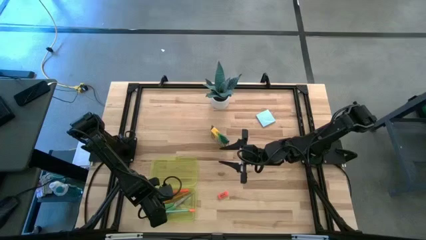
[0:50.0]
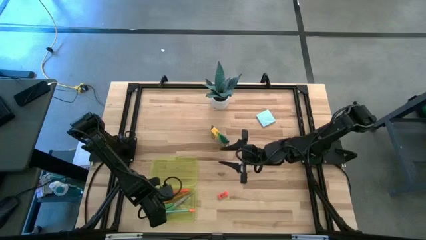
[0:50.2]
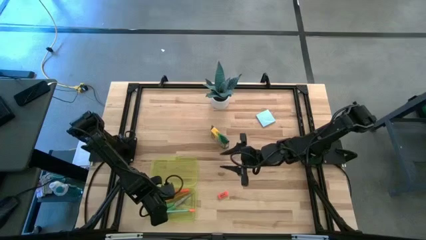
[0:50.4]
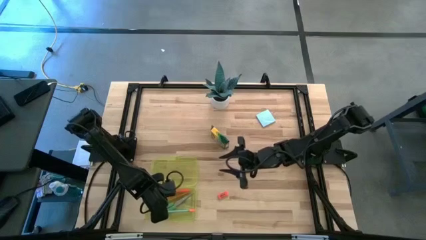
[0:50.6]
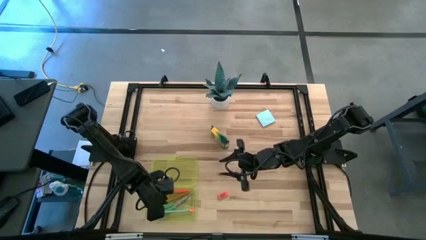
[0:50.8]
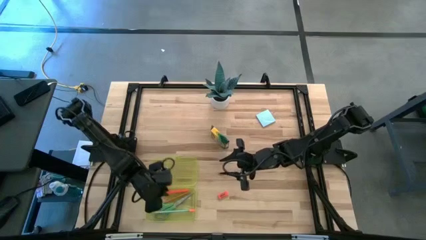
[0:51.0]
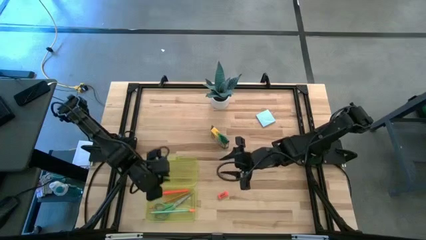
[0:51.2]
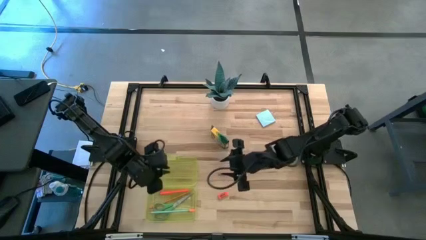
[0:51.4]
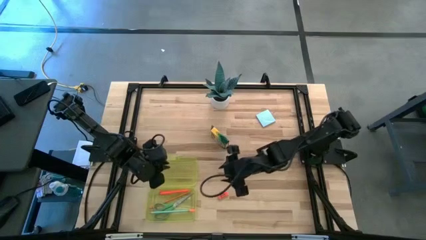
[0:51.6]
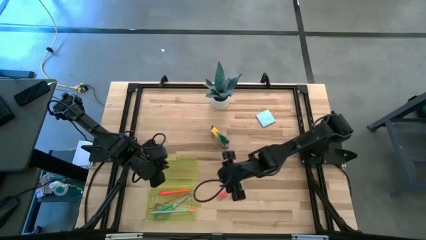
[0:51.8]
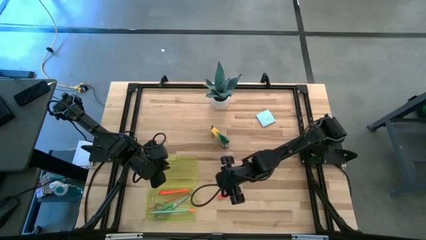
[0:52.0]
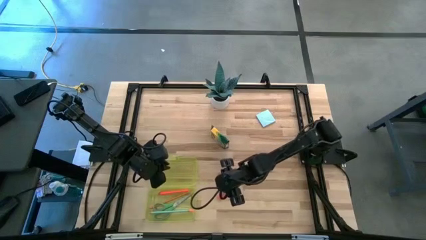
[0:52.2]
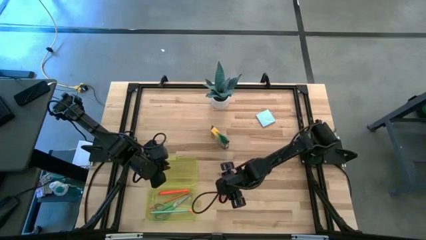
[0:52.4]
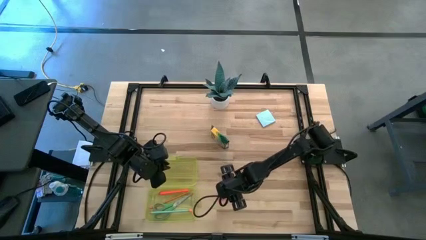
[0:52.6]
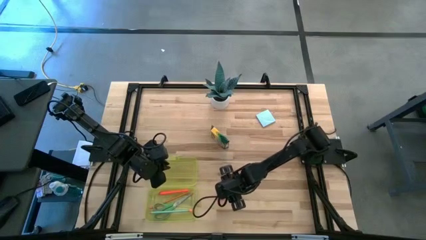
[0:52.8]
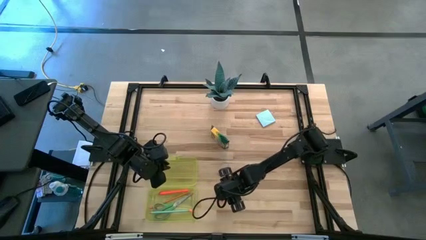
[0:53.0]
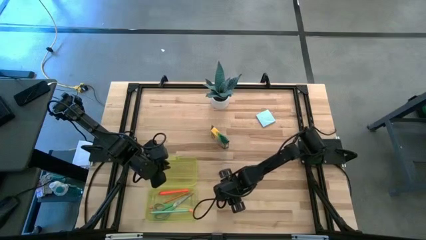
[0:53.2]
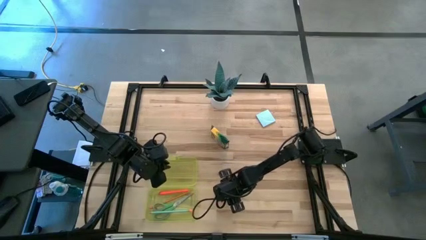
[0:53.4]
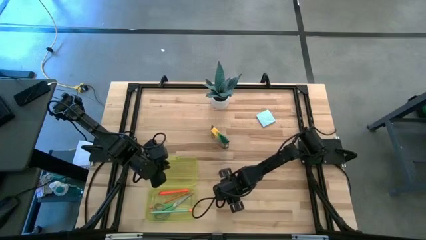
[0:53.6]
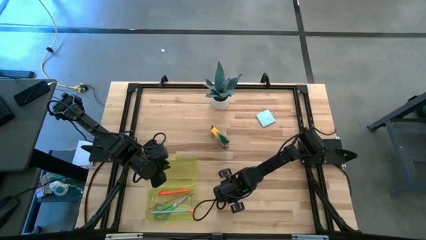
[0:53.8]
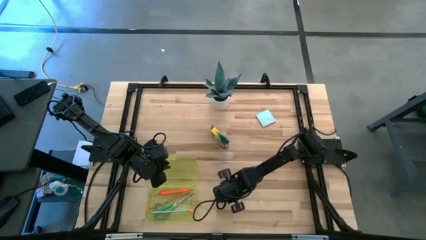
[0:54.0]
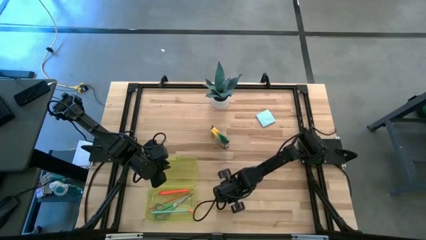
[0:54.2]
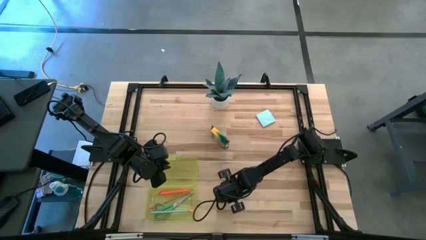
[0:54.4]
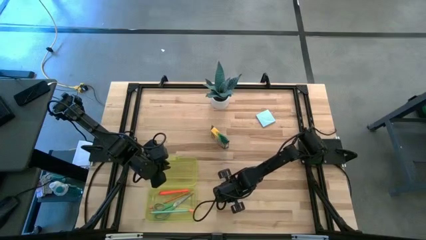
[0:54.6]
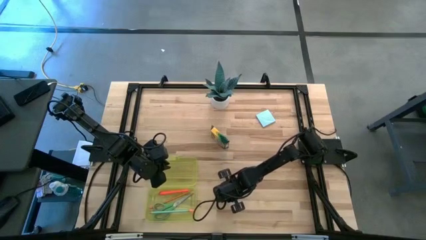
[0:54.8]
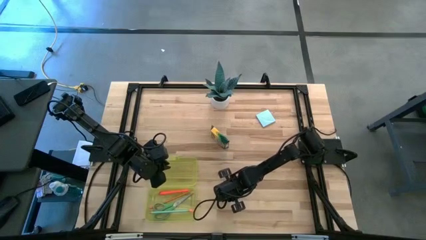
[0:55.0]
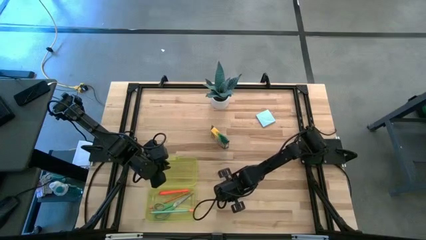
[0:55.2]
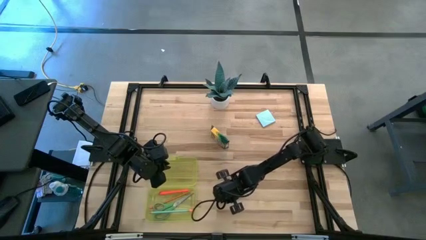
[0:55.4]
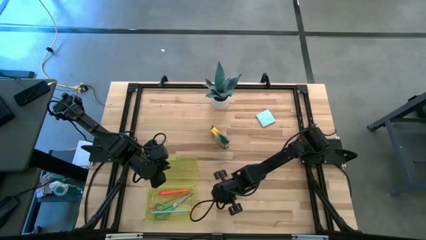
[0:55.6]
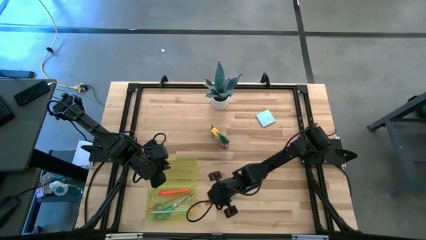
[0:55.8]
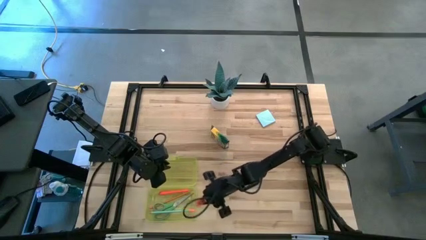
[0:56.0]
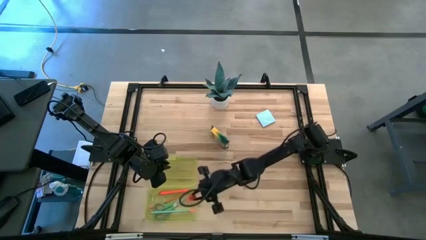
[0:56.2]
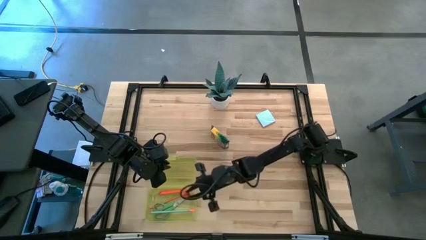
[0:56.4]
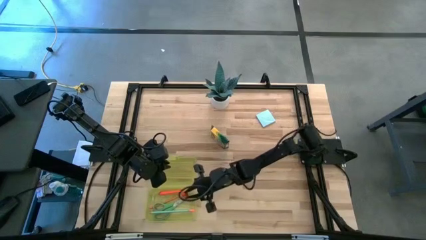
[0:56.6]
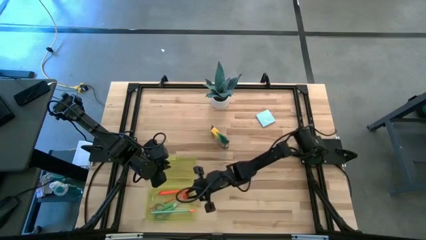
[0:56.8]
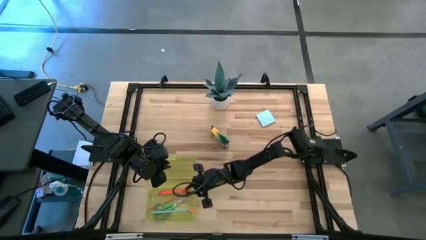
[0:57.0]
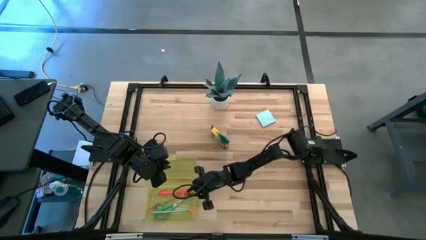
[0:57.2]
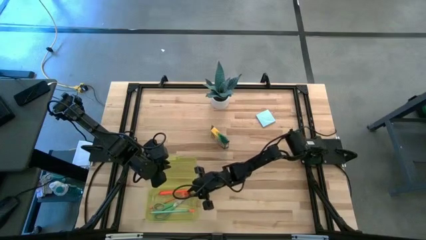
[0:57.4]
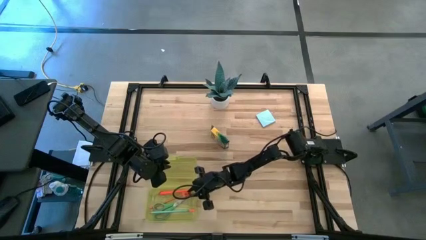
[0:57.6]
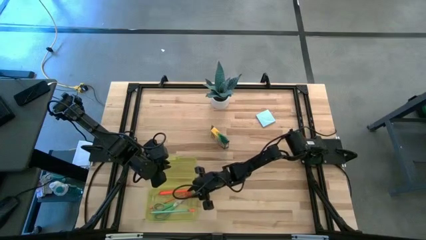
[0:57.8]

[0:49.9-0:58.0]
Task: Pack school essentials
Put the orange eraser into the yellow supply box

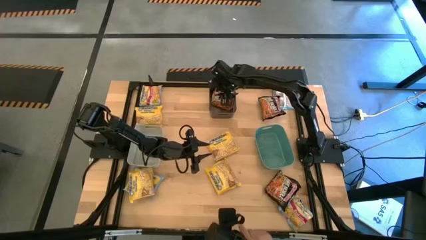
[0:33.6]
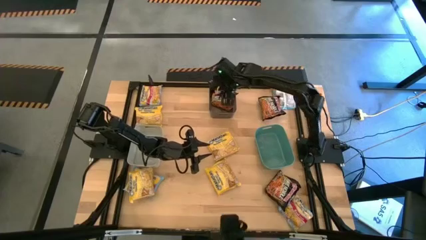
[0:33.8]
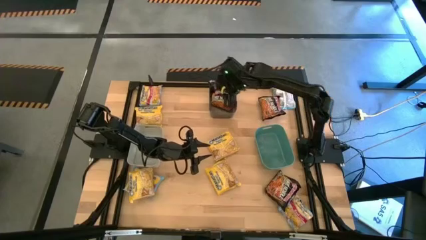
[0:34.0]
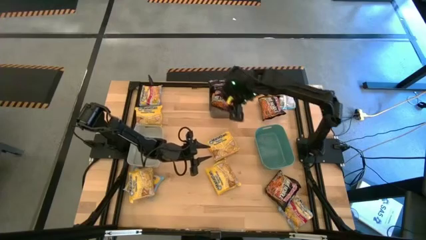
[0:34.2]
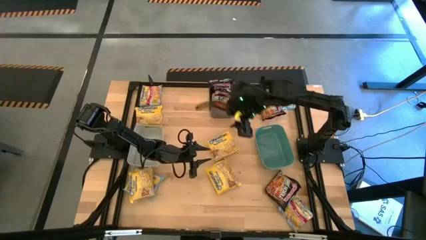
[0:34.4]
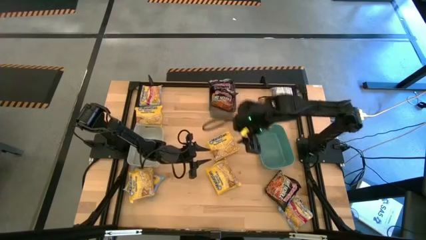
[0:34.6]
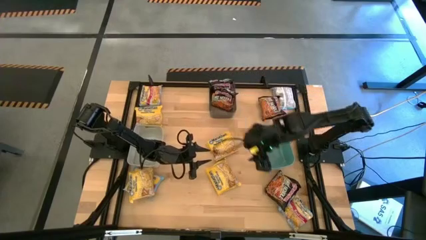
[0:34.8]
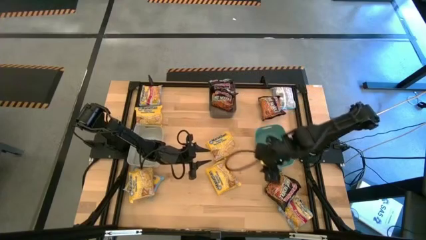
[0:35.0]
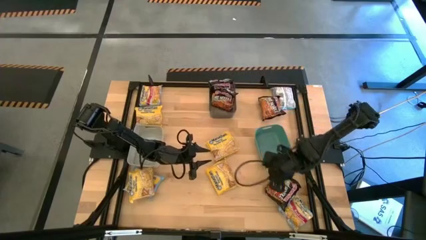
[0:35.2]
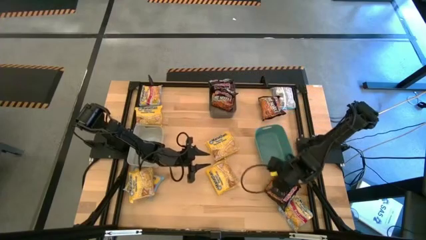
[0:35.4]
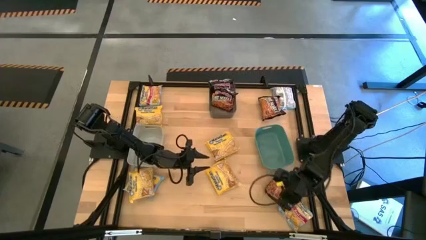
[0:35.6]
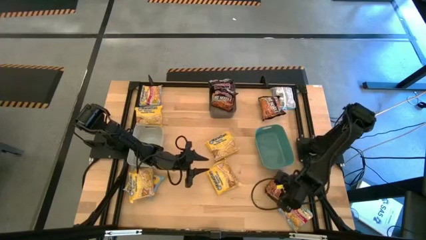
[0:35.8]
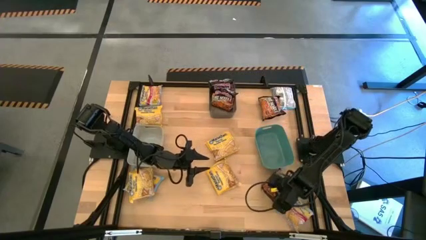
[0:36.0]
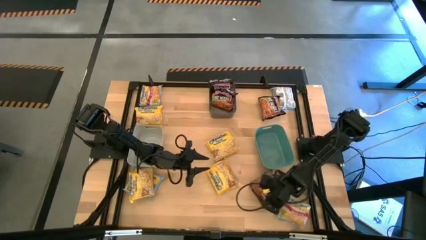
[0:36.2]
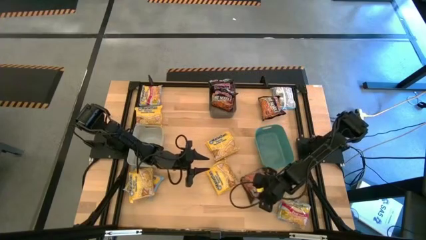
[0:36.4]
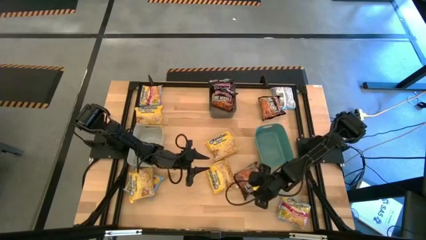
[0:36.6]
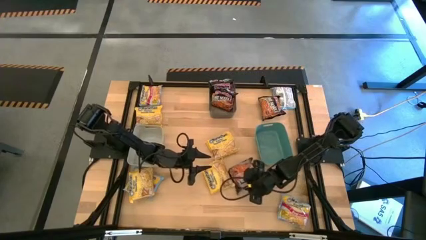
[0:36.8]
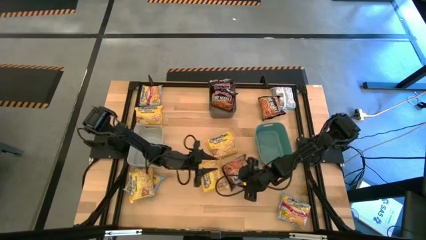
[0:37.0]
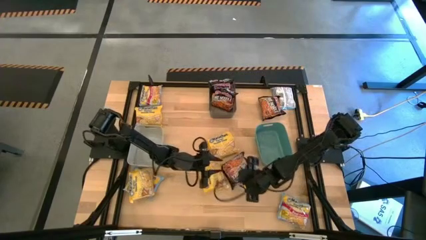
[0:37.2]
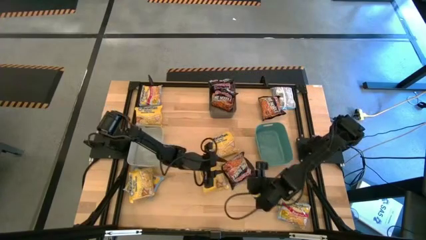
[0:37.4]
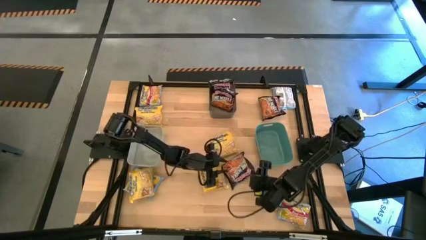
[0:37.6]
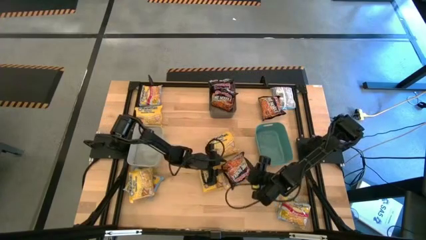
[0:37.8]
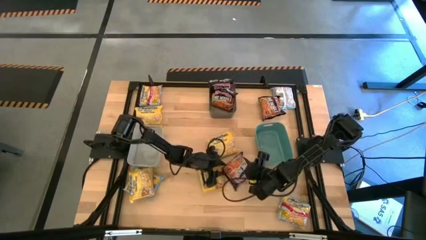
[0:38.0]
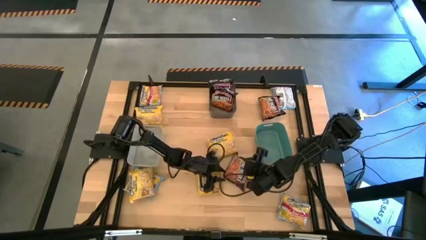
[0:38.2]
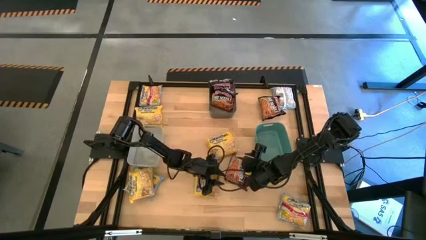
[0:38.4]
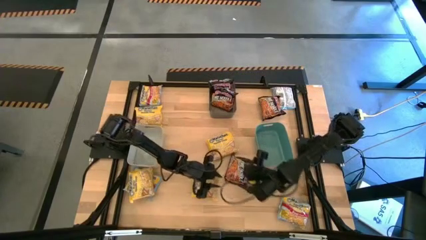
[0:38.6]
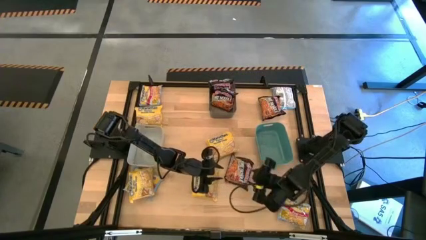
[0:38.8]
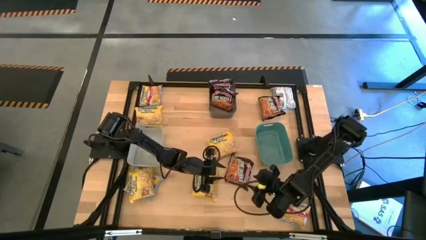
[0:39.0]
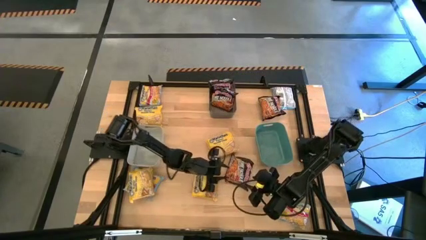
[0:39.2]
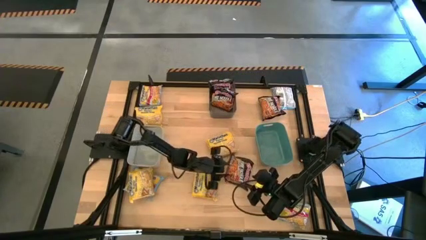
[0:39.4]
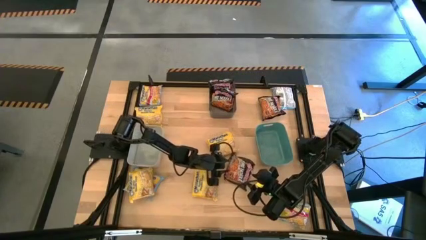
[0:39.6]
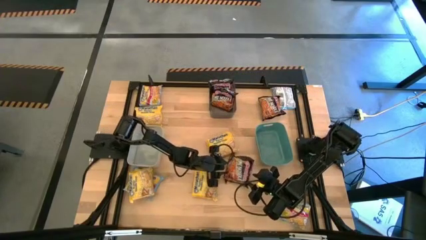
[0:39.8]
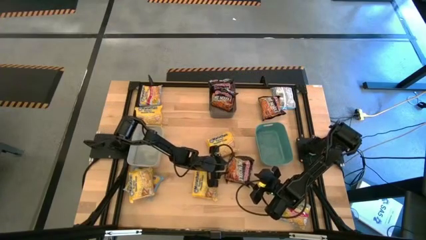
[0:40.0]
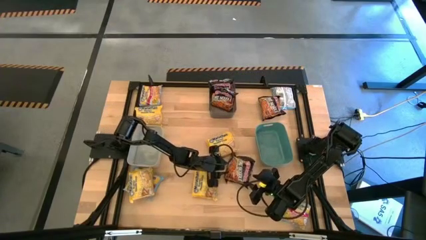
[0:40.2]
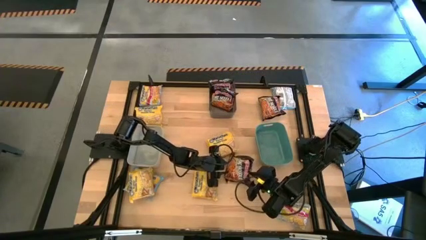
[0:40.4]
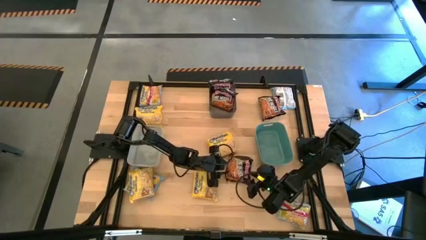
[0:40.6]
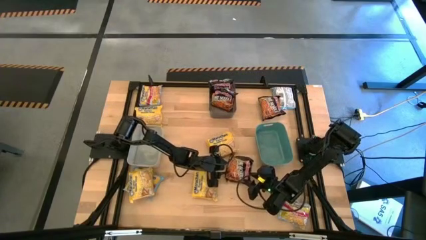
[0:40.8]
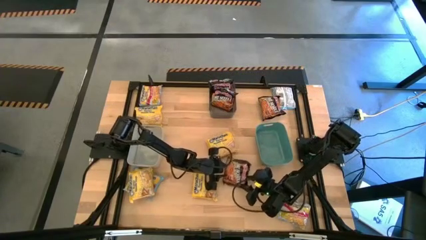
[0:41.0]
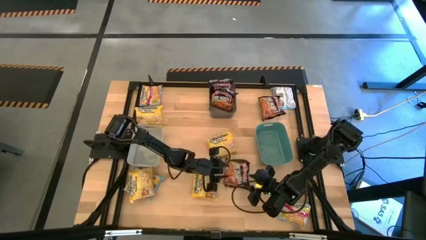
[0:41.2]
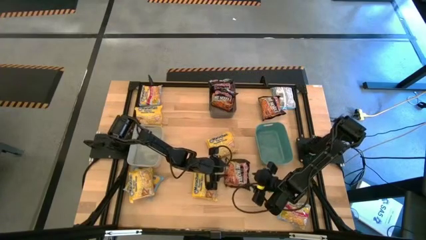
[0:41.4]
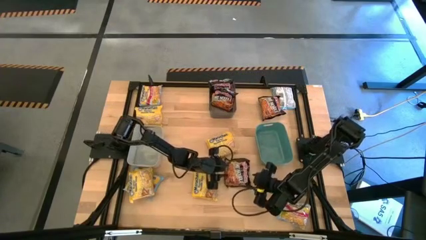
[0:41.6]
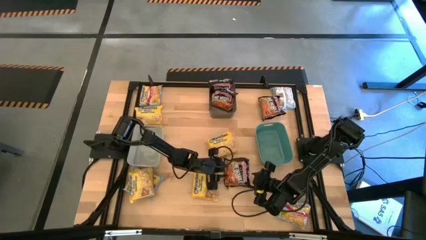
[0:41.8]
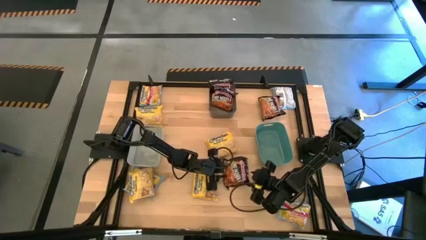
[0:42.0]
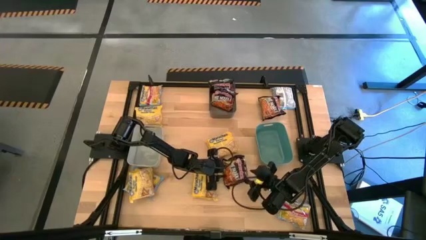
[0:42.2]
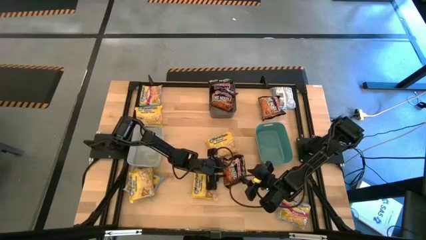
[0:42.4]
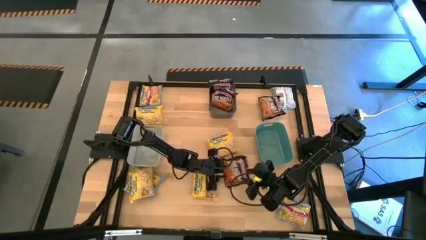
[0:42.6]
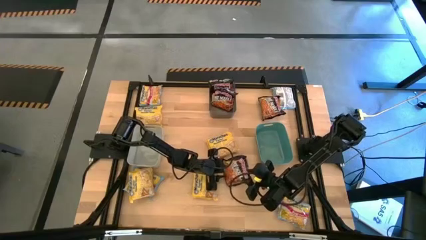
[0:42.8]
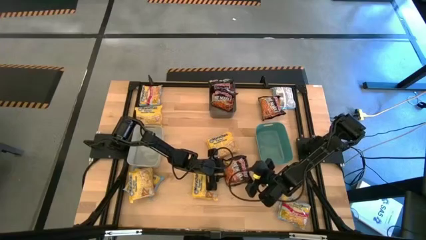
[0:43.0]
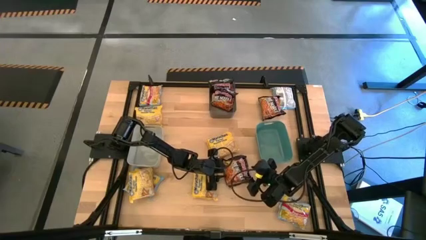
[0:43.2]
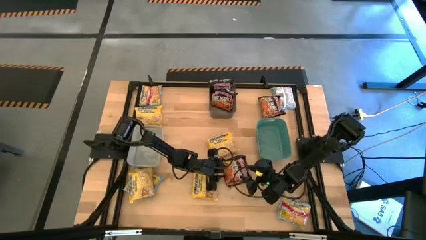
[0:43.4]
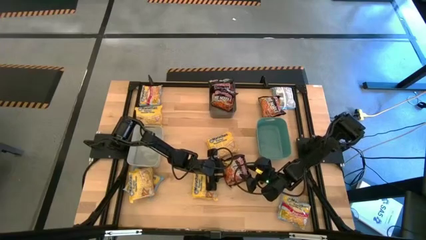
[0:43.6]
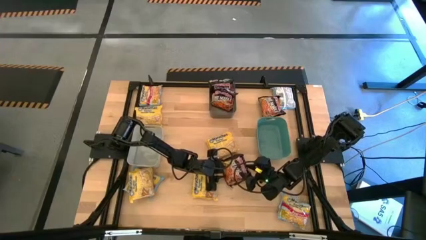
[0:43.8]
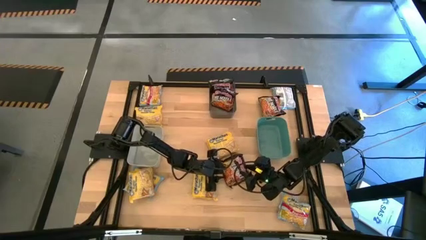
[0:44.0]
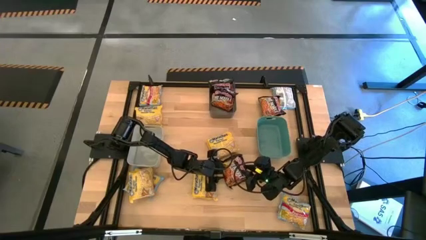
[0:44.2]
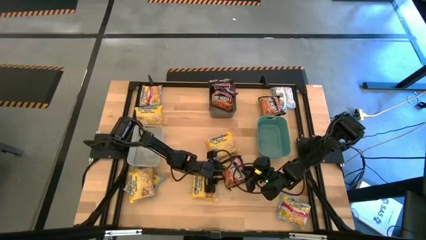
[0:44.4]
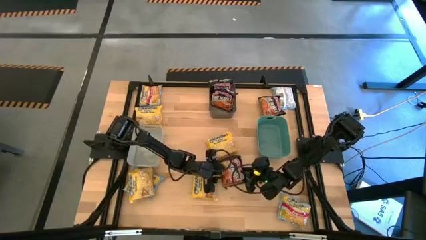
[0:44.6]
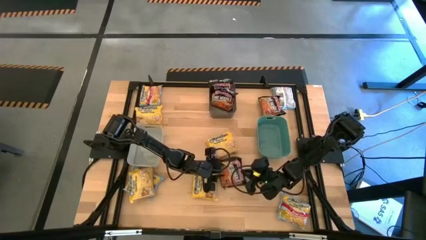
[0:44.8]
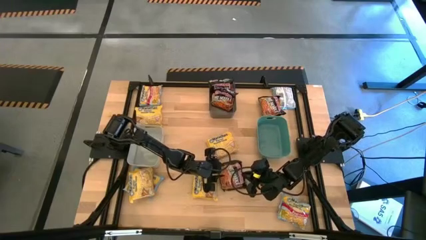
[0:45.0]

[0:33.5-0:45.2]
Task: Sort Maruchan noodles
Put the black noodle pack into the black bin
